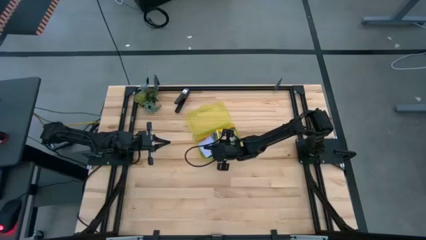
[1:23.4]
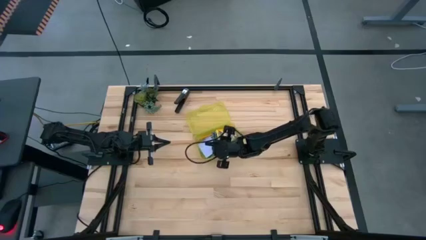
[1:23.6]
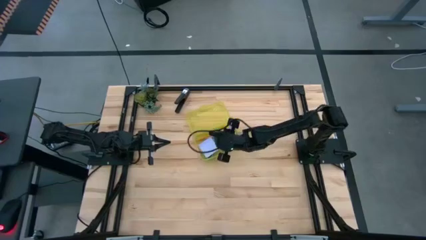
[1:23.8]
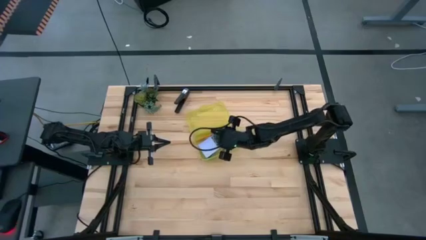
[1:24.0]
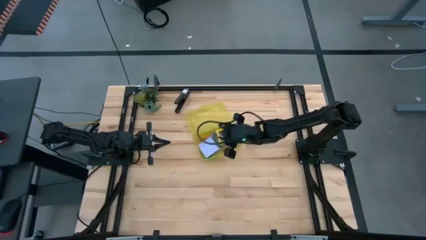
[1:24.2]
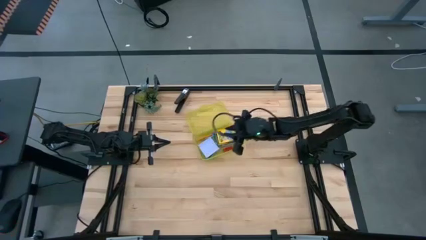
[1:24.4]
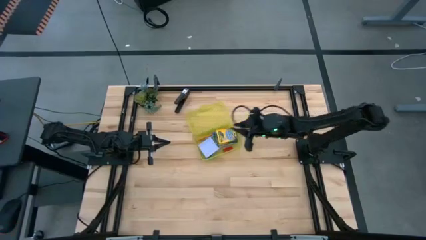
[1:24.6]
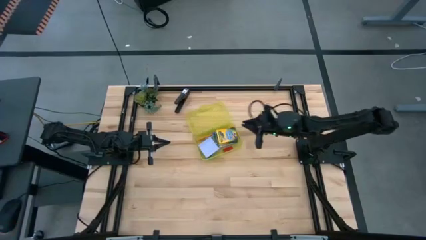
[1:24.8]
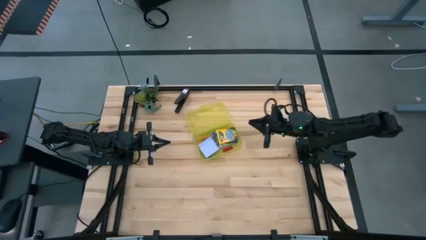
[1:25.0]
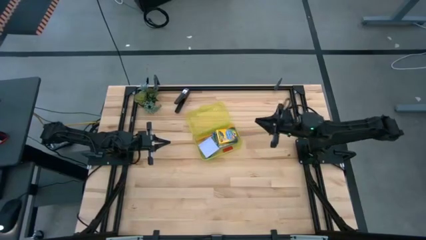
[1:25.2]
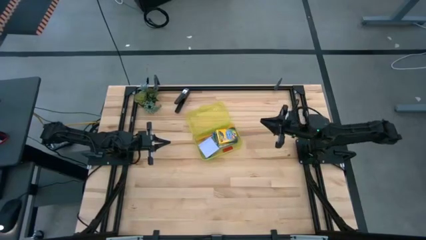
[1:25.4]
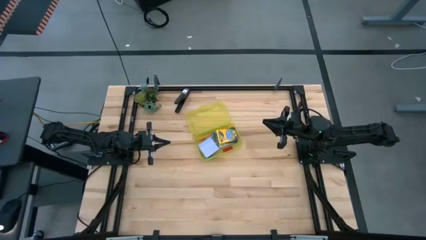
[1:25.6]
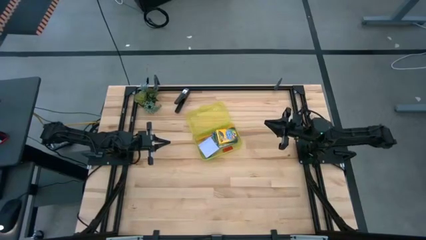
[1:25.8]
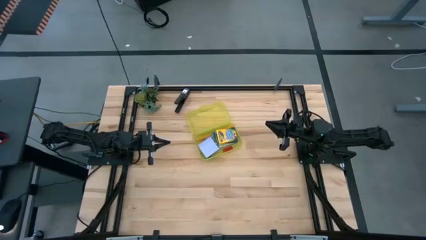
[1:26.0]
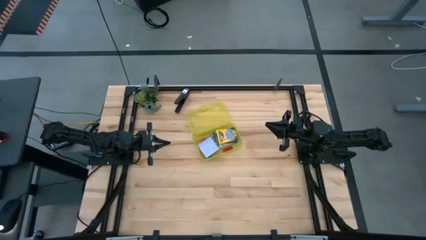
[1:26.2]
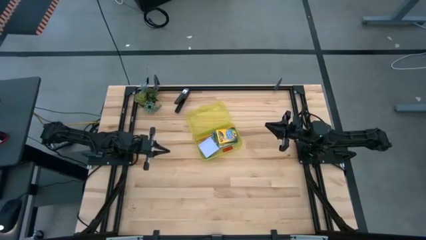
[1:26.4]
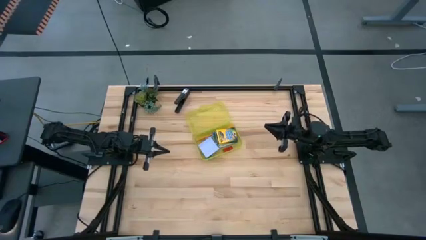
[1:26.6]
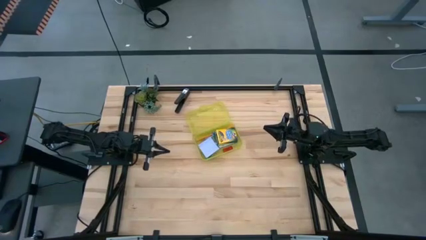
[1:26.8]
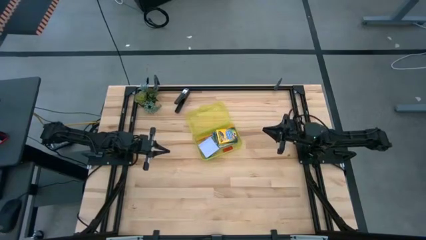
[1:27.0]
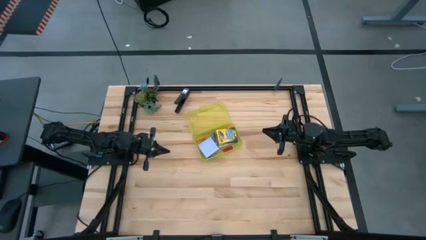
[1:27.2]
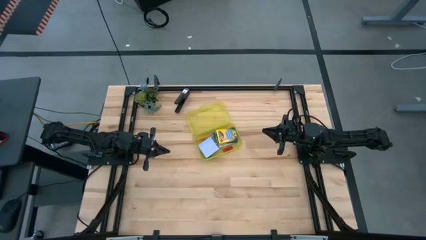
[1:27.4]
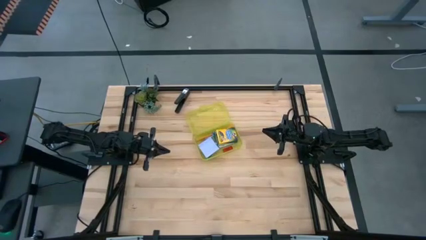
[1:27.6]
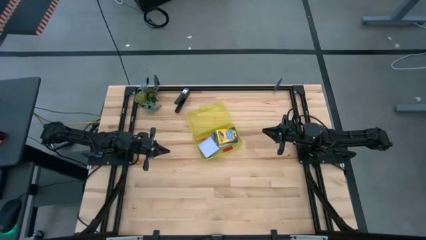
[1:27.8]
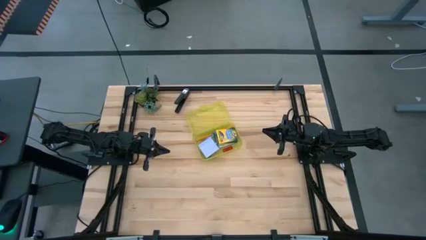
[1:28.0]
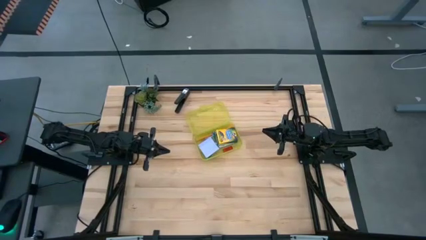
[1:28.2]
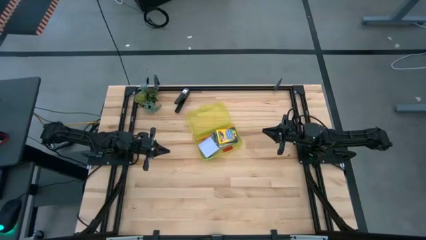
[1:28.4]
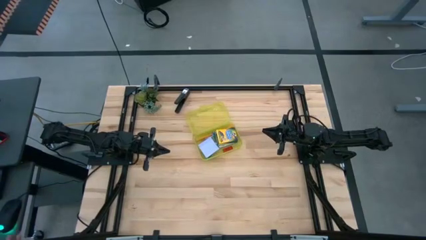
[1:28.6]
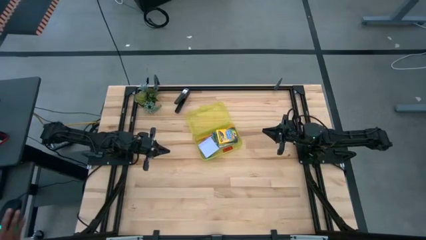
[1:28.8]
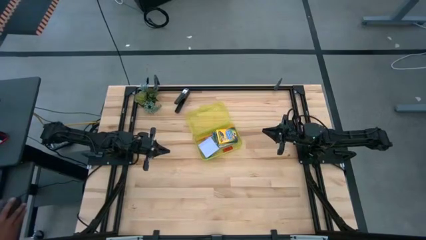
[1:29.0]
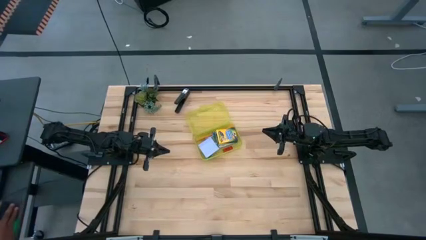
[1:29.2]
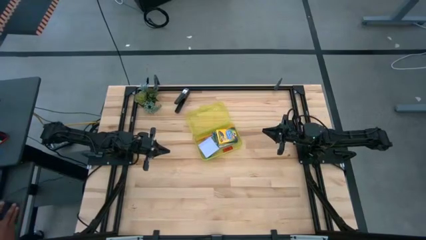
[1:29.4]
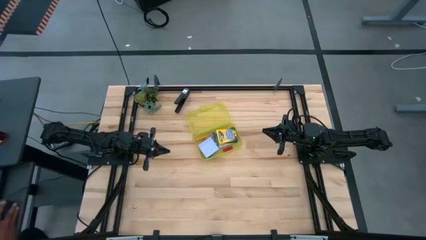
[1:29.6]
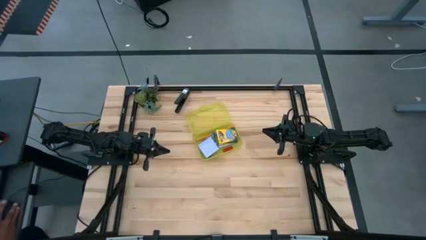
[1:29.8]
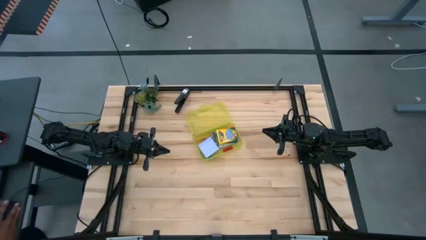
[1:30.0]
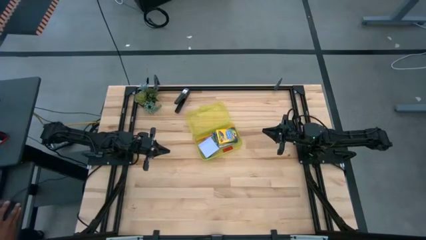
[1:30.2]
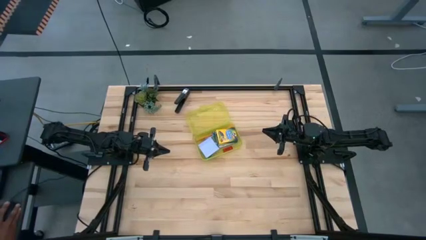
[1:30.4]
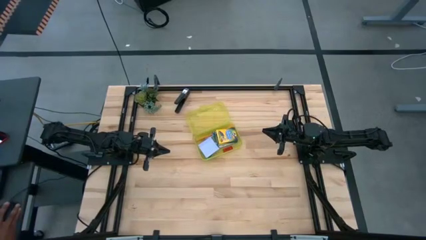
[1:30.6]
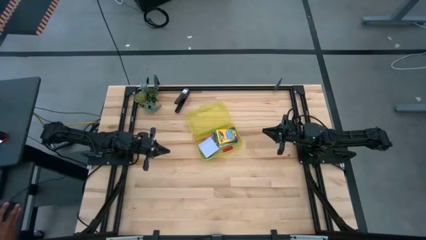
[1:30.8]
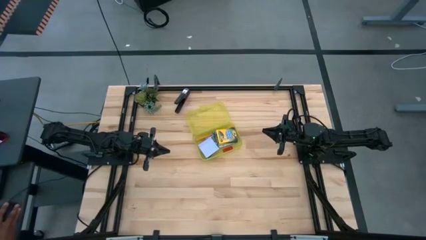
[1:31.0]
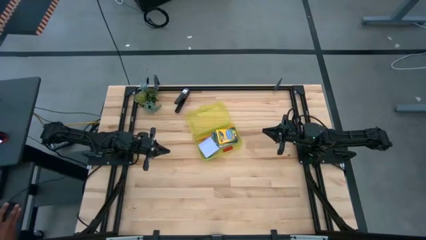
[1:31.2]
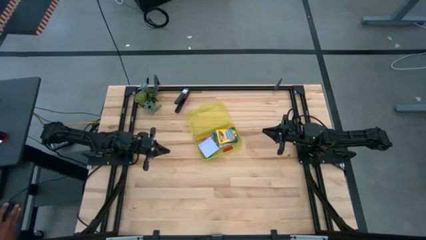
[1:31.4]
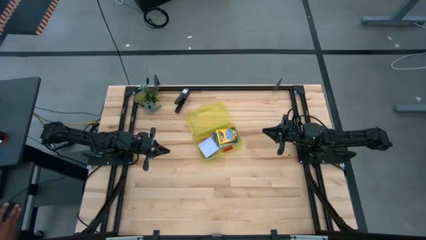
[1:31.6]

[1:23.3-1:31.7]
Task: Pack school essentials
Return to Home Position

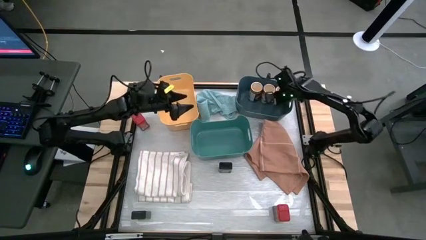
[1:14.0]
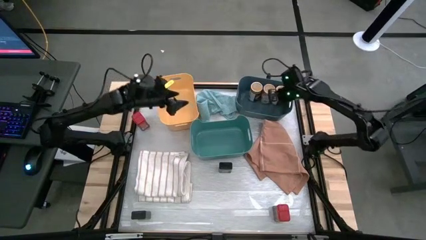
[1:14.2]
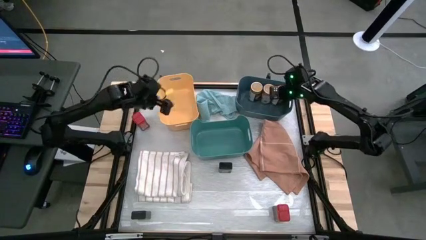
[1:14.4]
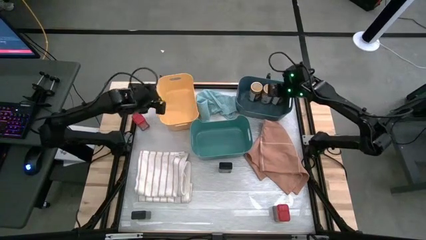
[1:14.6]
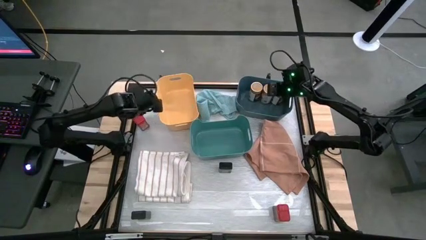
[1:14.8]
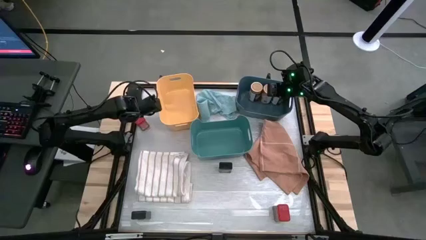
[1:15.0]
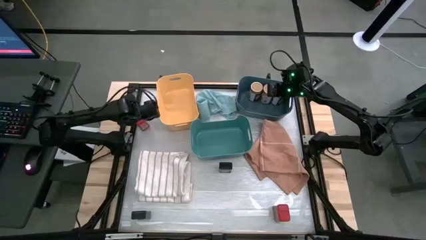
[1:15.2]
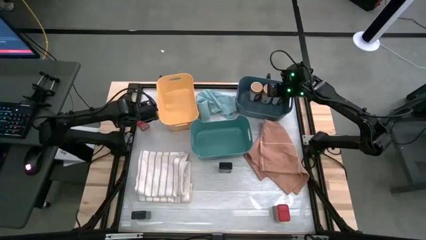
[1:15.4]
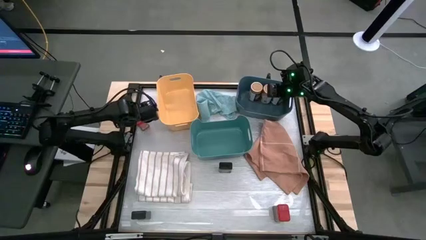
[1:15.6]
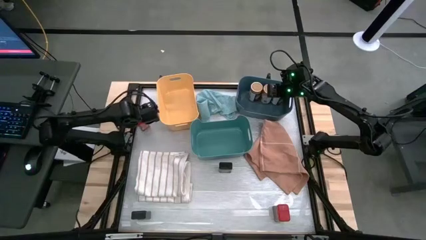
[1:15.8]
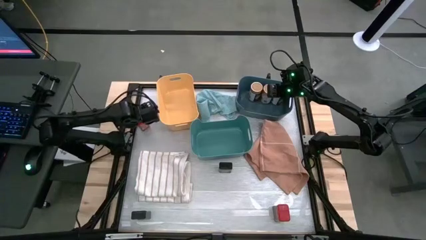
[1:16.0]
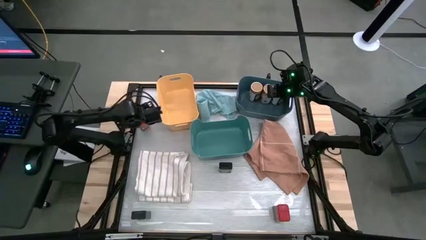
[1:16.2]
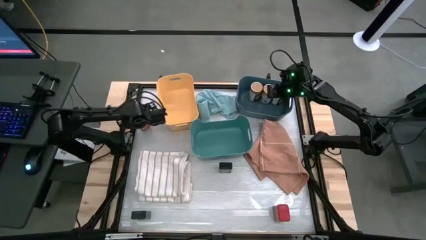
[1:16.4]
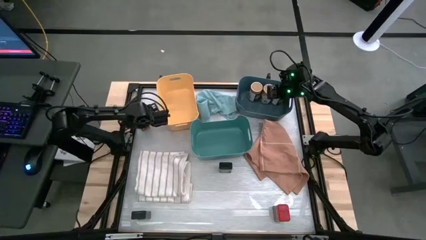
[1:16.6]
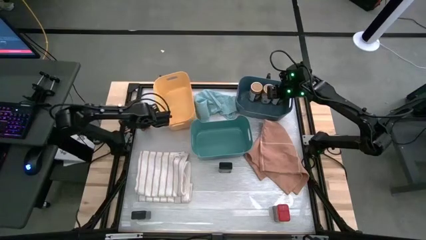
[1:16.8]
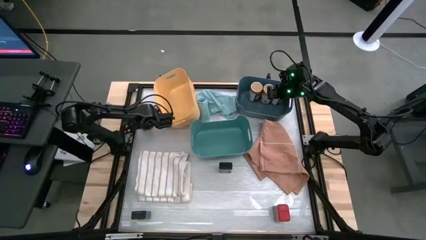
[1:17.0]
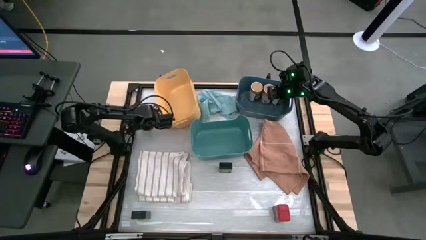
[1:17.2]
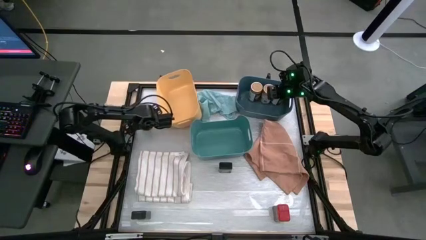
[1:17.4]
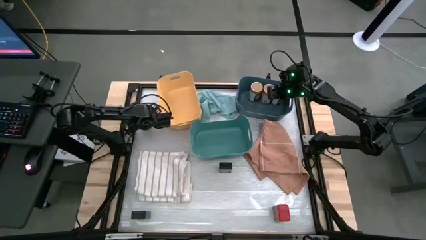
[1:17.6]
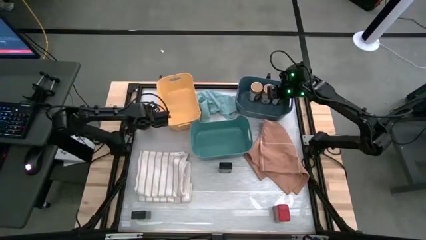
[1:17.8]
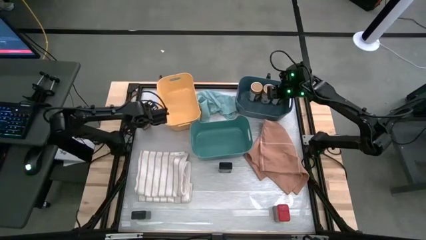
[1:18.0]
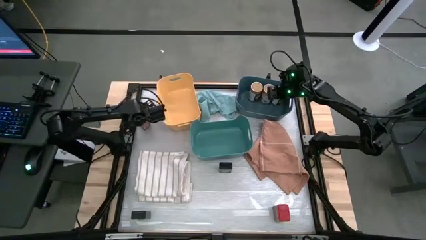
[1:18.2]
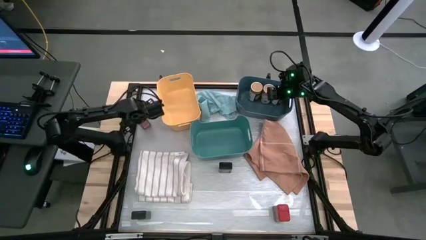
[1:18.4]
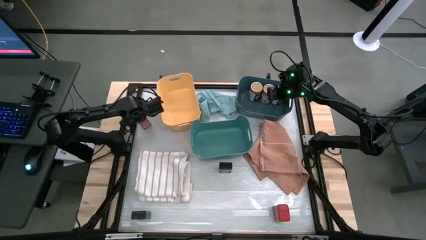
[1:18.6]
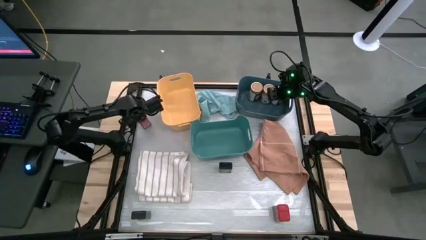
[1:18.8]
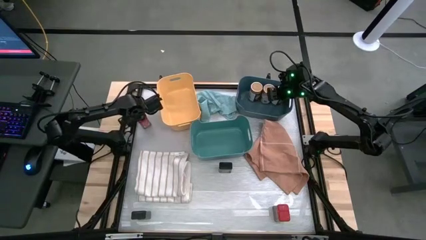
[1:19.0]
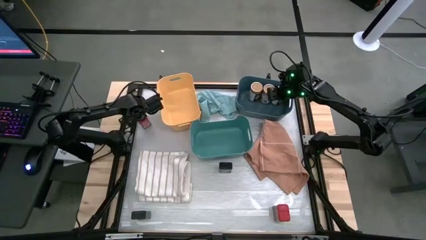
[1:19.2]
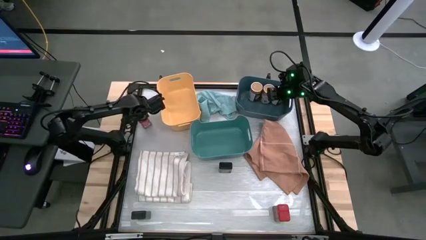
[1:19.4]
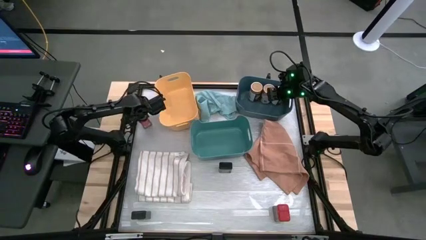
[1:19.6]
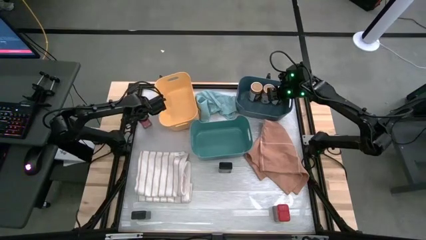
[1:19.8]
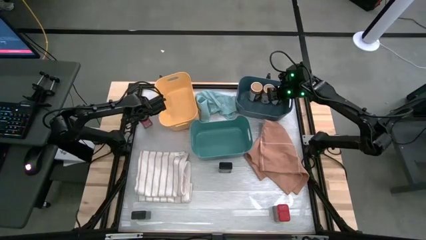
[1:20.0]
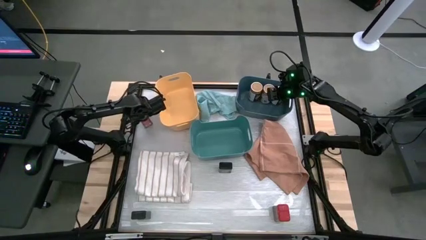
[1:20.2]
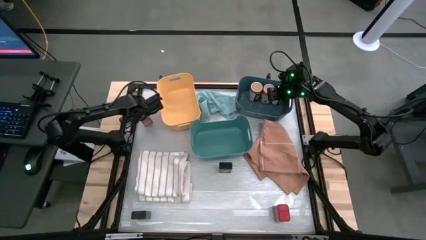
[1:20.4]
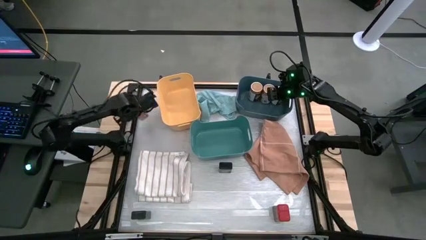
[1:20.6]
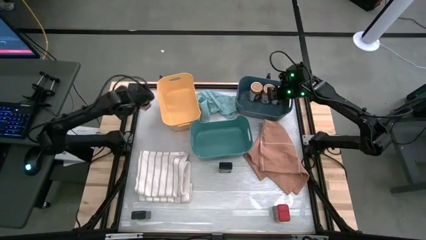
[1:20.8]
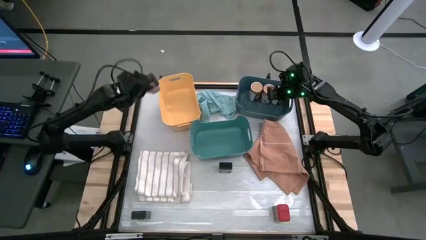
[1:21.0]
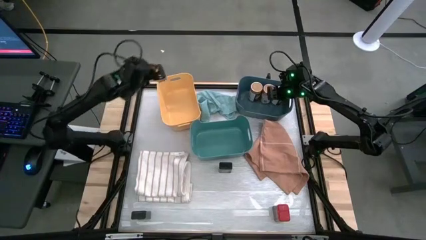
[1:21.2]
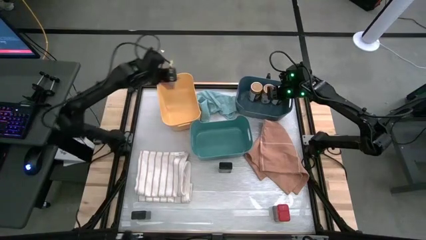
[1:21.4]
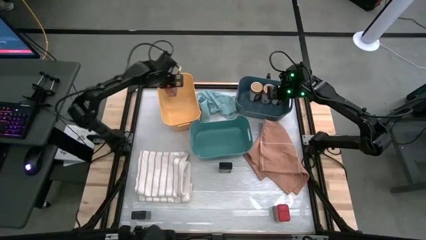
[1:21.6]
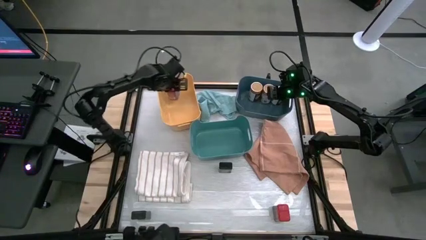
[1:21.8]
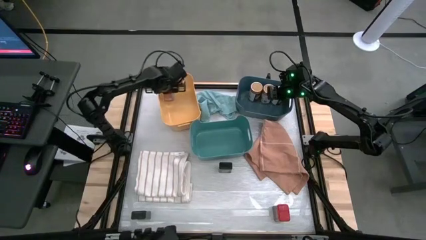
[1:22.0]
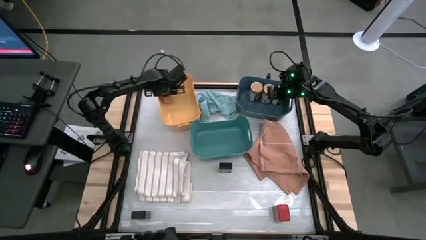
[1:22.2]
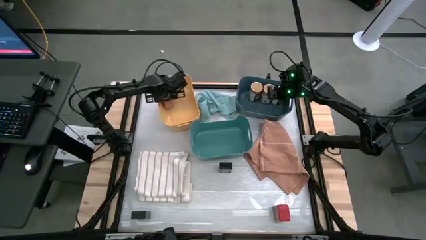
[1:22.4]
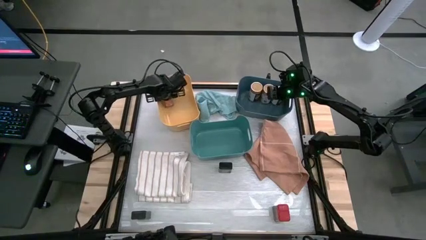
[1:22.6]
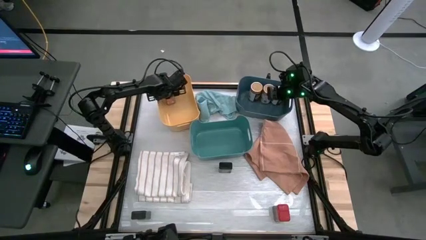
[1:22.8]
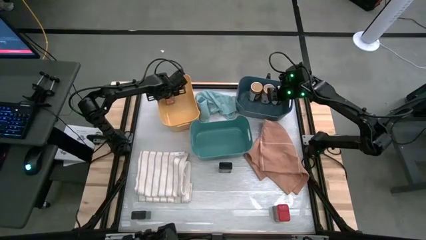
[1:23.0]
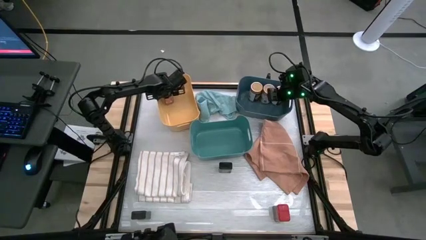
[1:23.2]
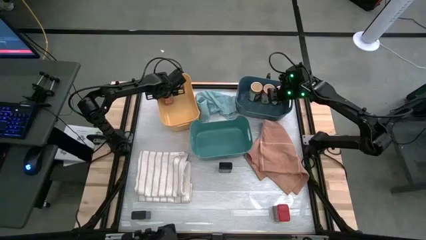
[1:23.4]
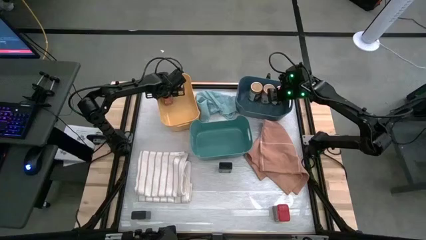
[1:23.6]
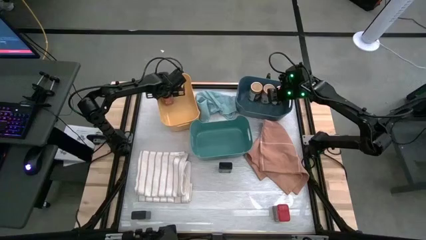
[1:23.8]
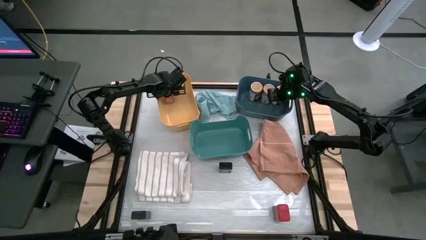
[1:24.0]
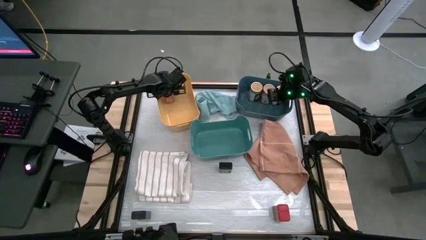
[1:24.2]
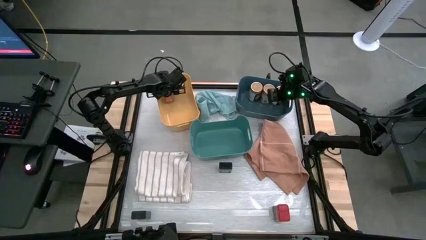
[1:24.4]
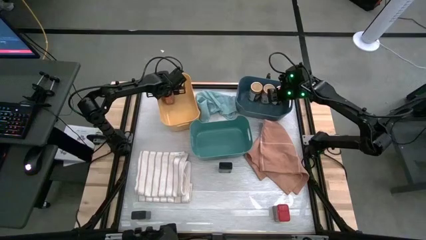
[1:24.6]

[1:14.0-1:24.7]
Task: Sort spices by type
Put the top red seasoning can into the yellow bin
